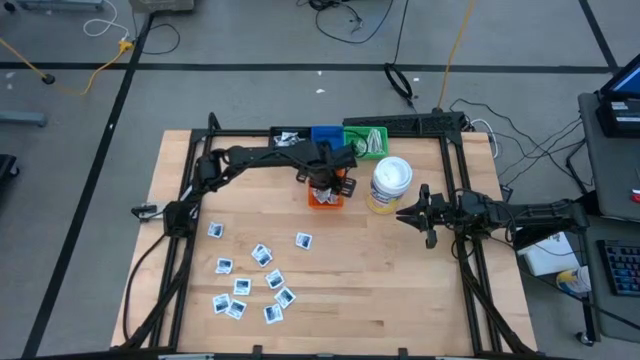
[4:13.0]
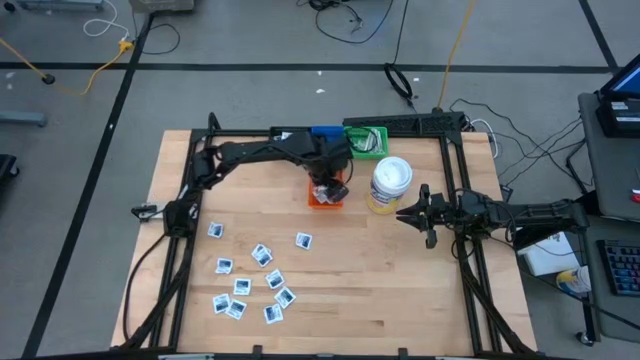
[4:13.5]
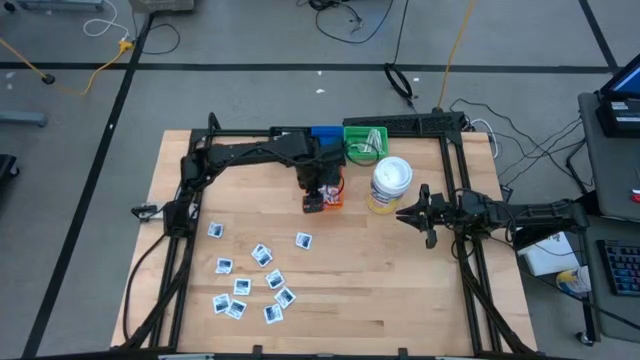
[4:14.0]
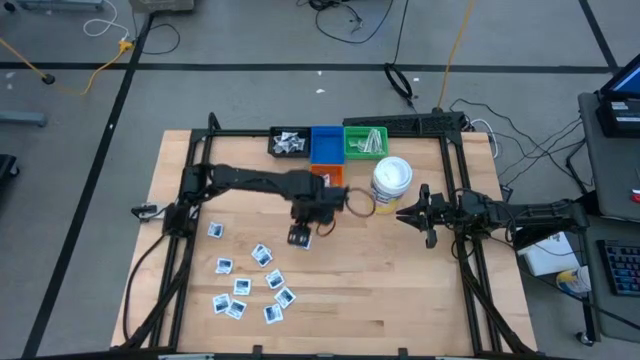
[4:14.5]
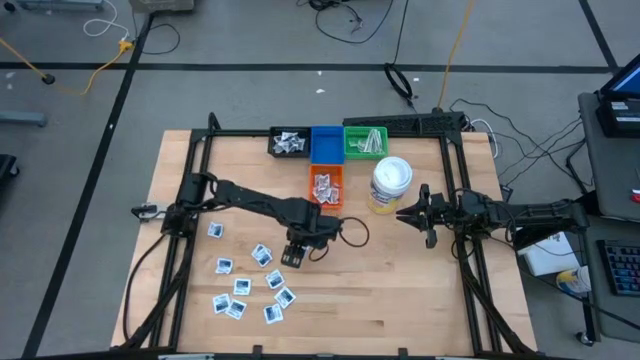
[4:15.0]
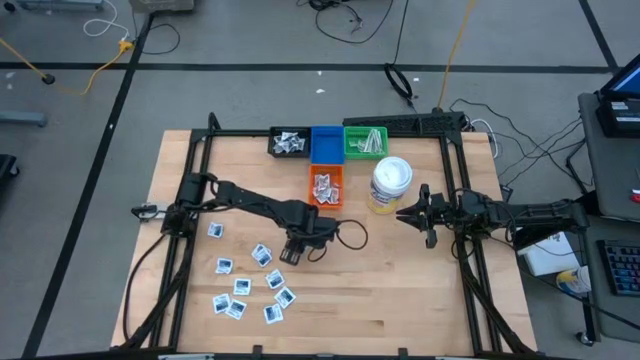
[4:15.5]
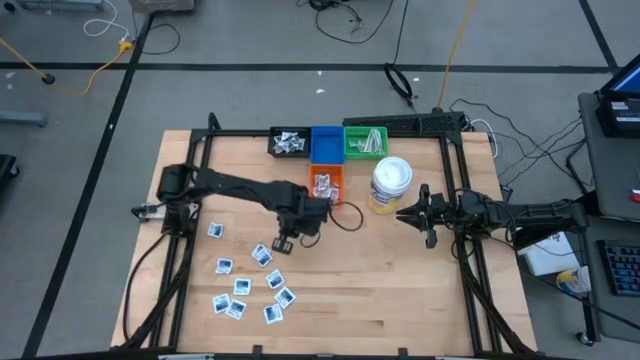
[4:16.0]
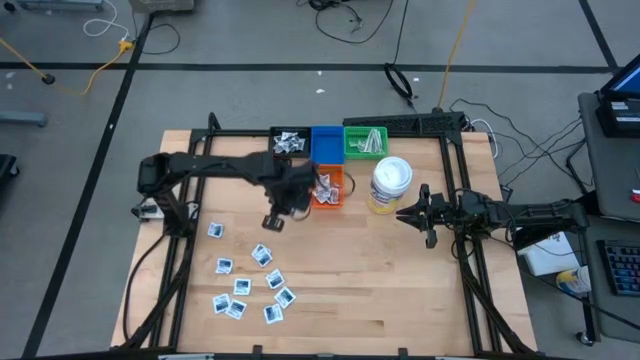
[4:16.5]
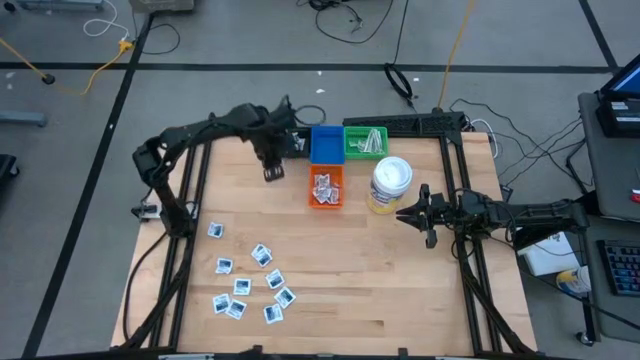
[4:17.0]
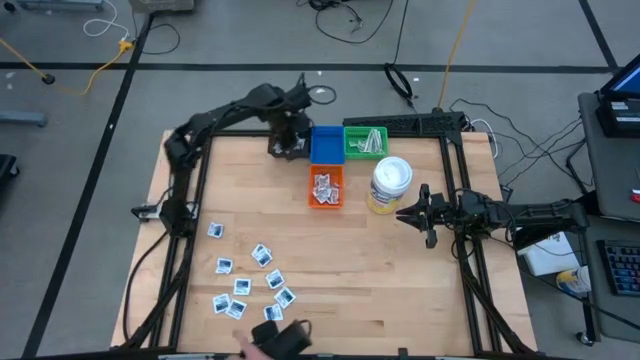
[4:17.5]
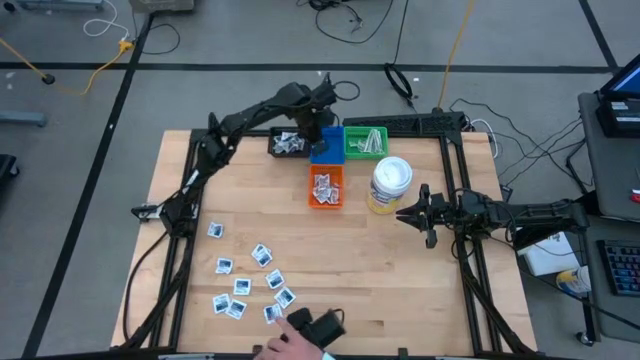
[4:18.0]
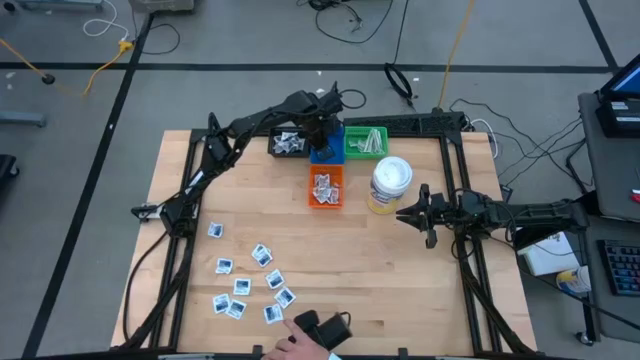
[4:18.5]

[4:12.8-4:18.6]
Task: Pick & Place First Aid Supplies
Put the blue alcohol pad into the blue bin

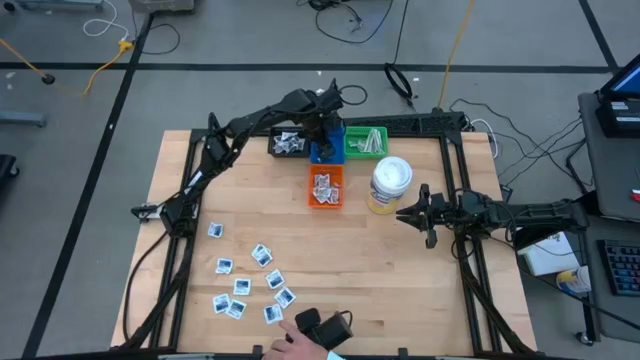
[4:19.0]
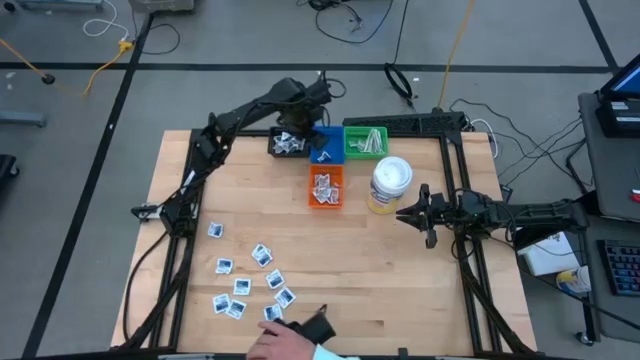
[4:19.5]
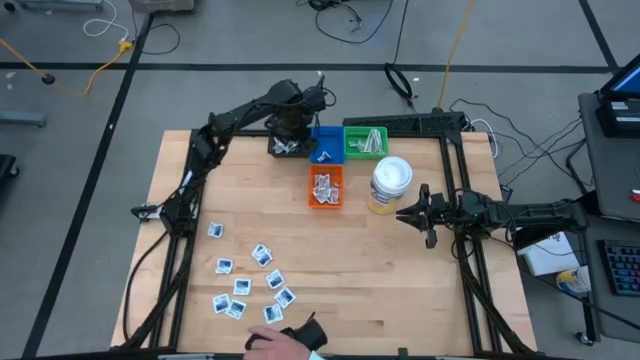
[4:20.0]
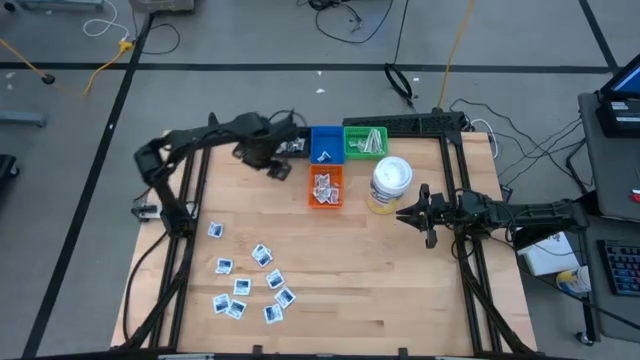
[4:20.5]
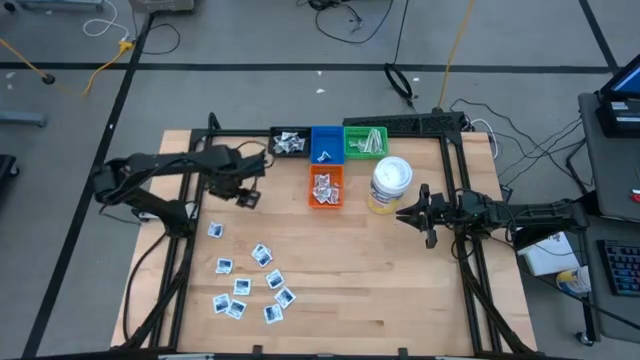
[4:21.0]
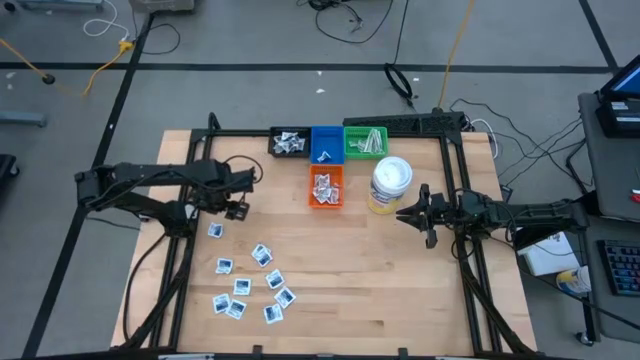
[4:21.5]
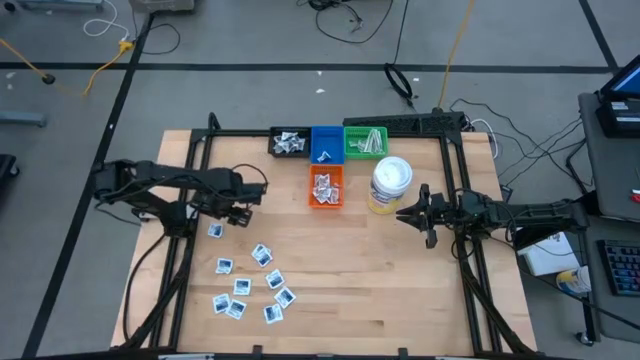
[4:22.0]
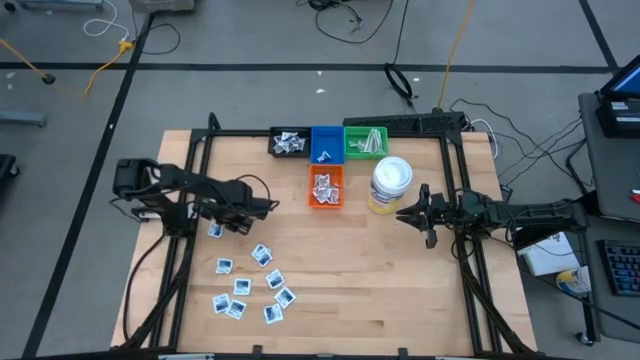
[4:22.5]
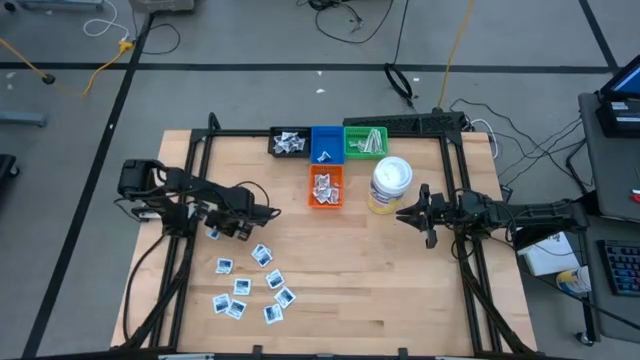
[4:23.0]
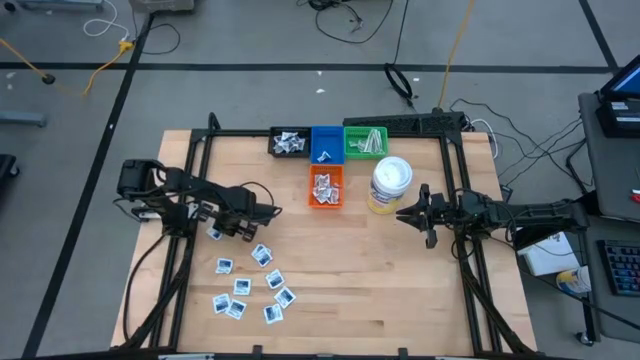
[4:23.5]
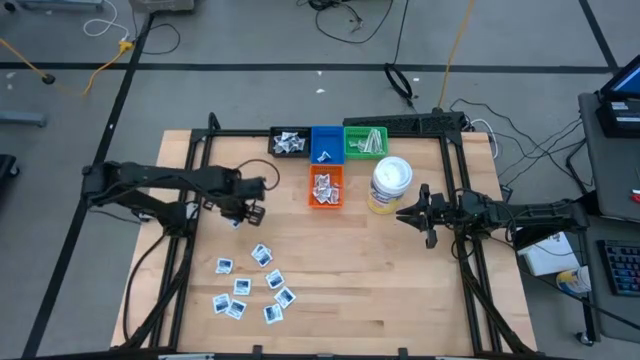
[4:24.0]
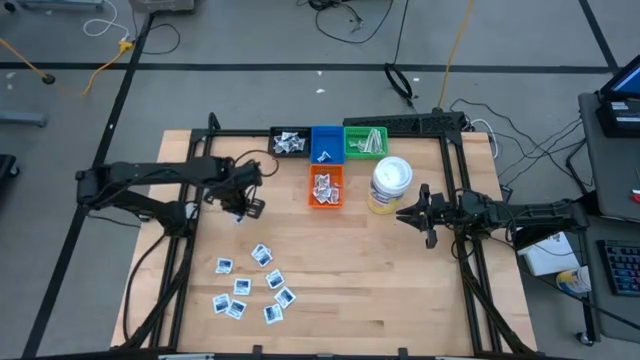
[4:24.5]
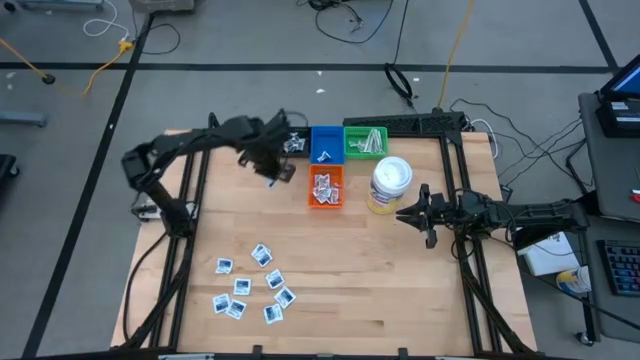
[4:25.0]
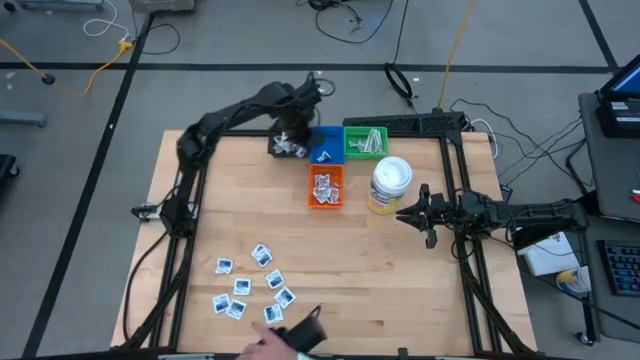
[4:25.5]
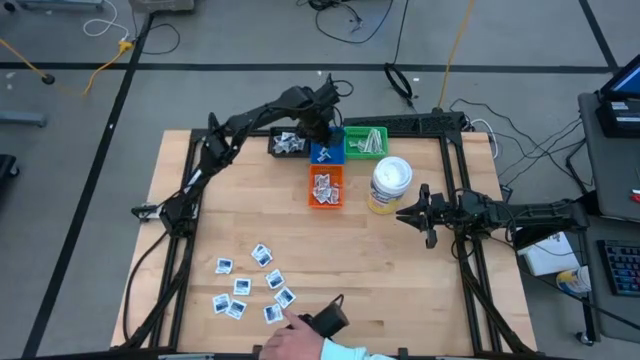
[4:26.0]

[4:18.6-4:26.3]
Put the blue alcohol pad into the blue bin

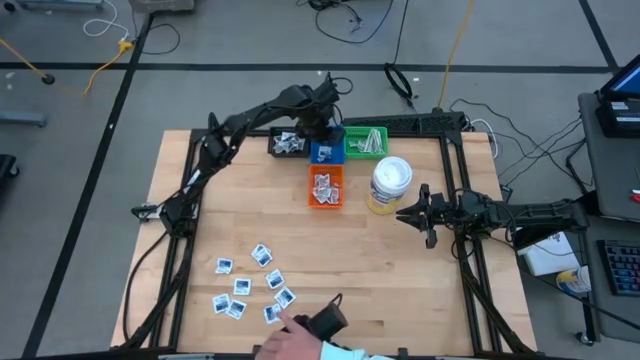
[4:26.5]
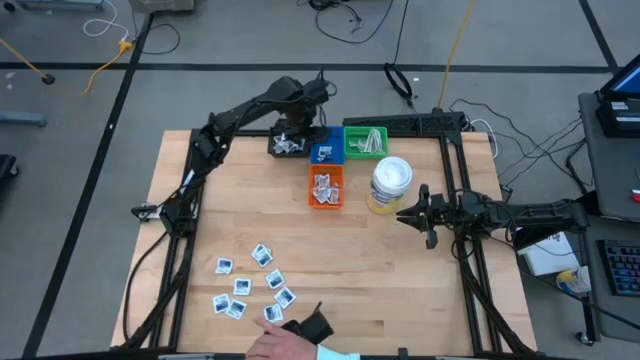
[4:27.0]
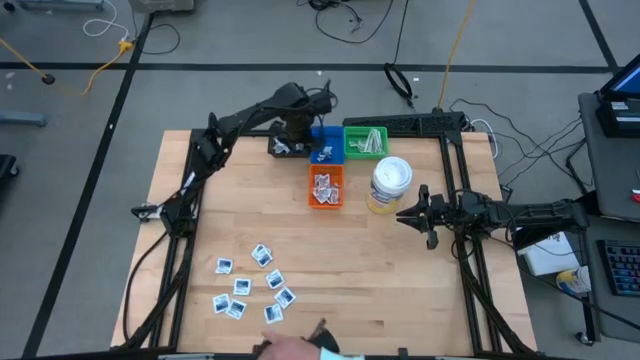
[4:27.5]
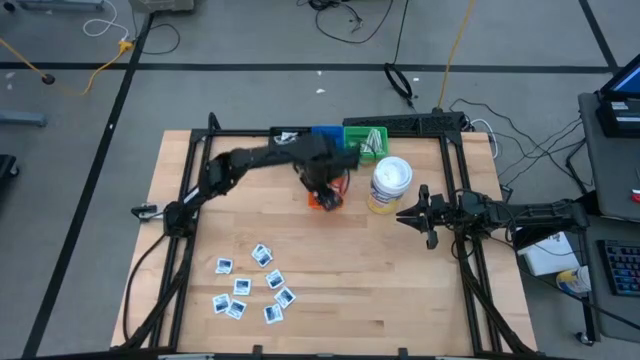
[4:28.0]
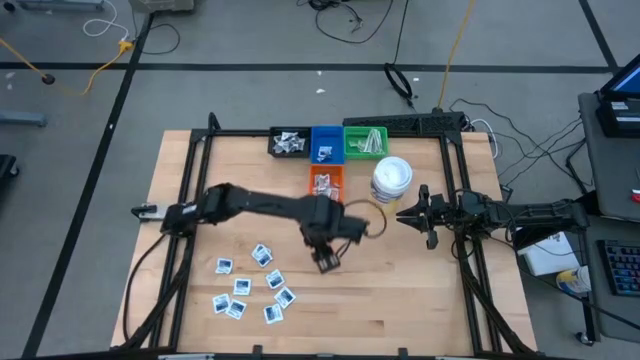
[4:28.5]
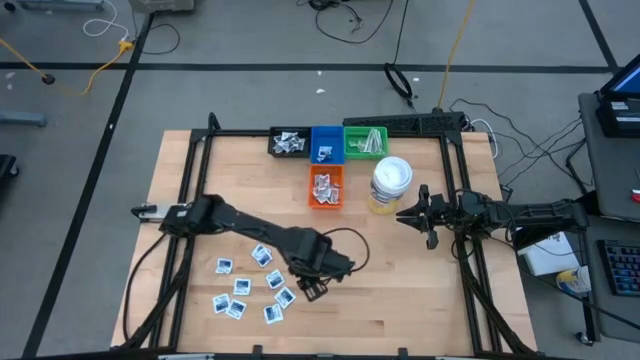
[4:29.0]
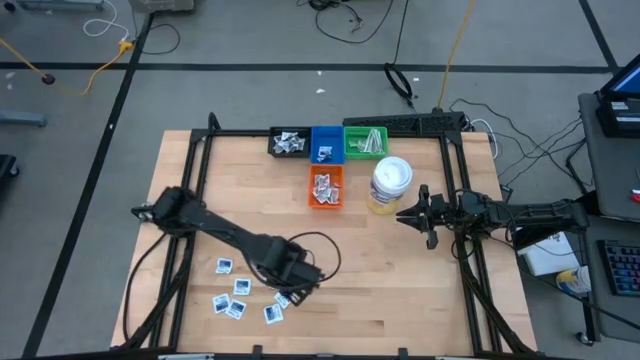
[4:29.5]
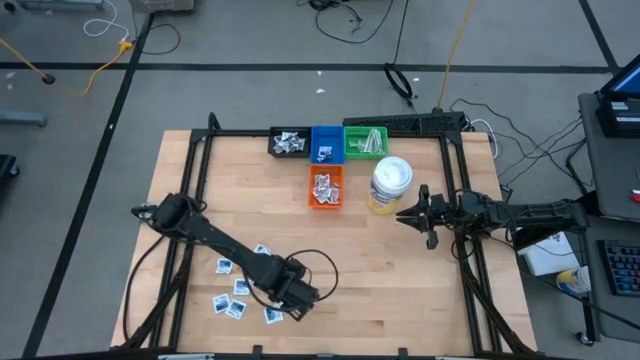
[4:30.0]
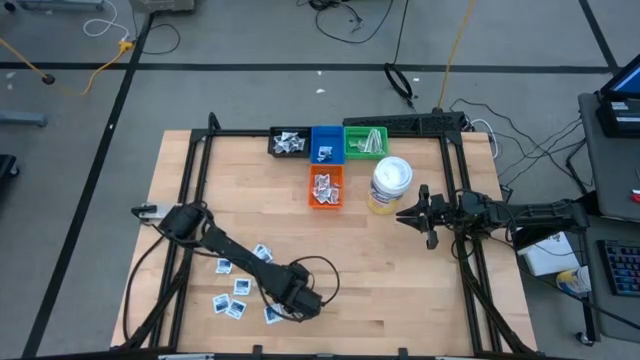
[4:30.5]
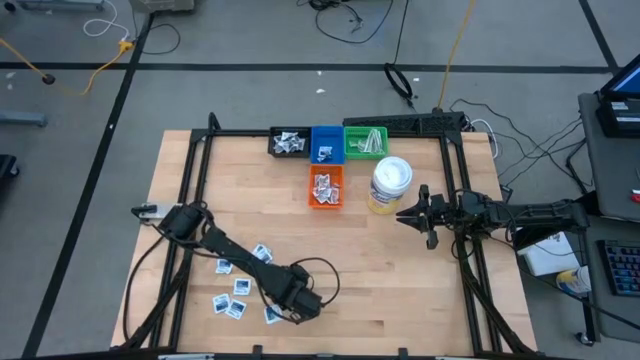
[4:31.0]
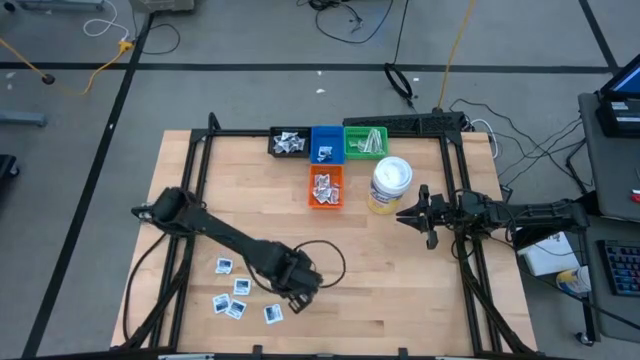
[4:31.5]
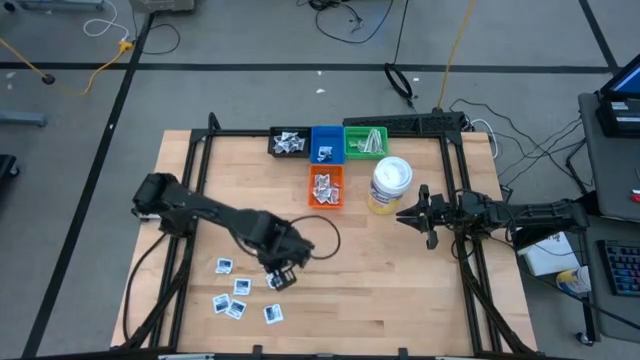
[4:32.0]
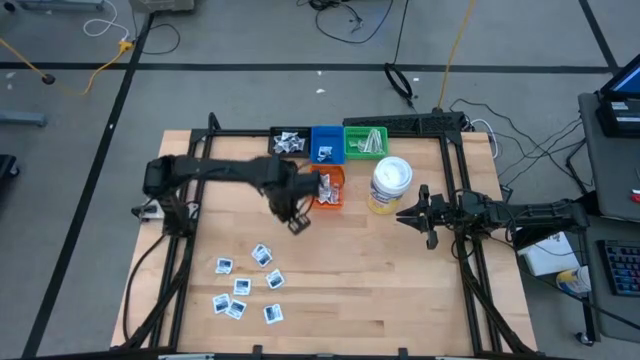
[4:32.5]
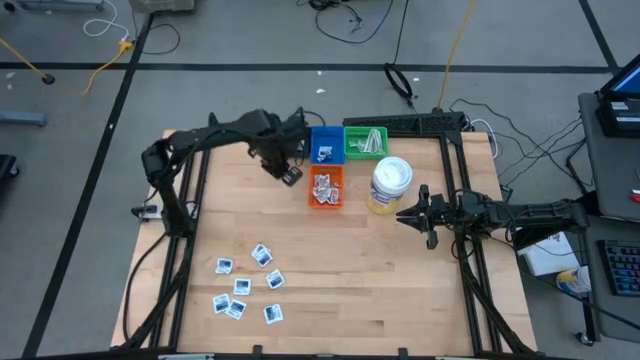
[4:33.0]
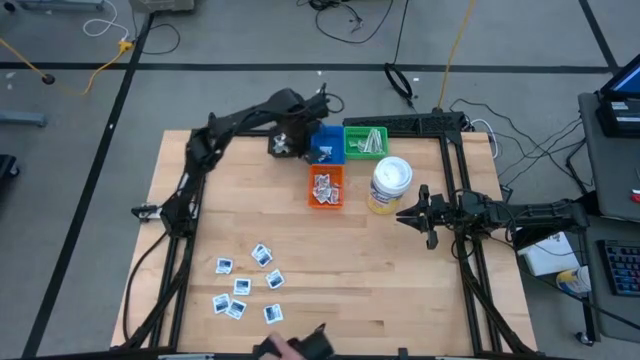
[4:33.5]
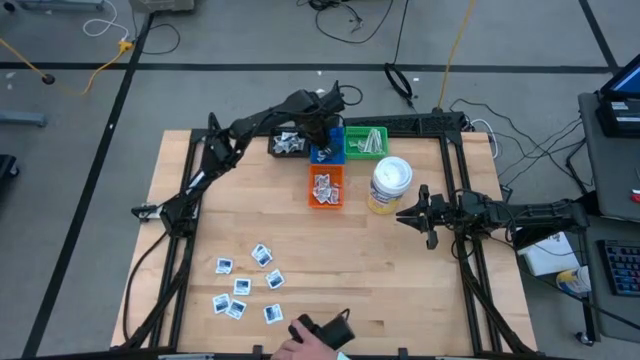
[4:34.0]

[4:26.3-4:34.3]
Put the blue alcohol pad into the blue bin

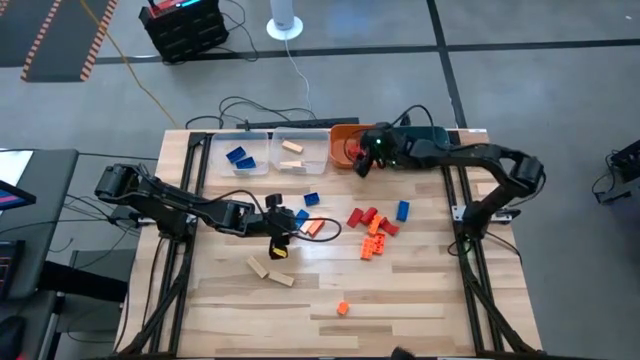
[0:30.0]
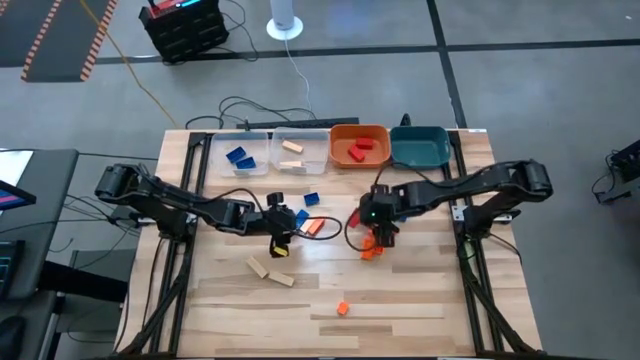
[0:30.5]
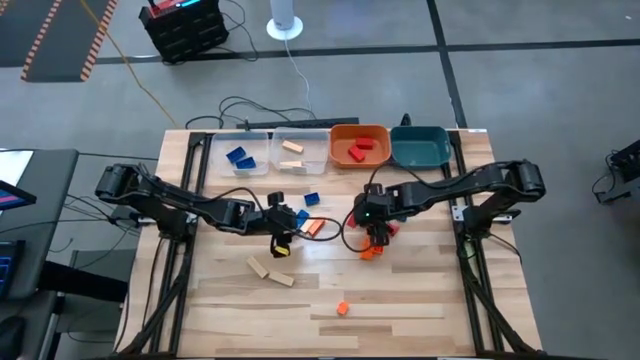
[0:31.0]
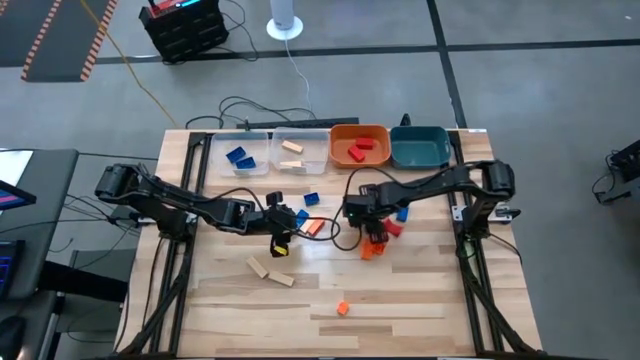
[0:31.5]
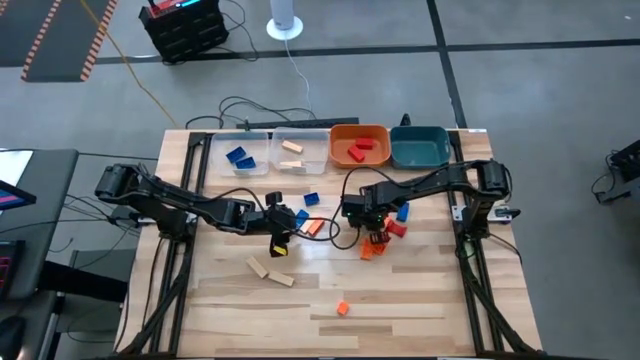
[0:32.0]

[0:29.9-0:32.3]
Task: Sort blocks
Put the red block into the orange bin
